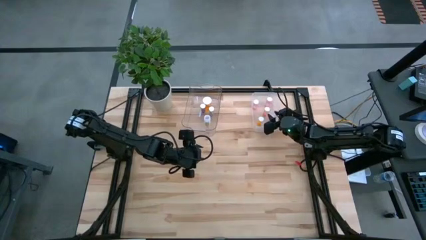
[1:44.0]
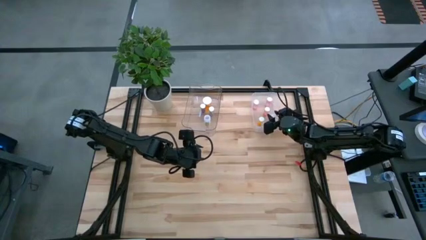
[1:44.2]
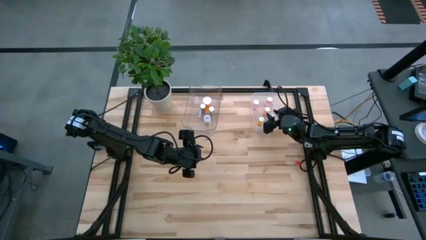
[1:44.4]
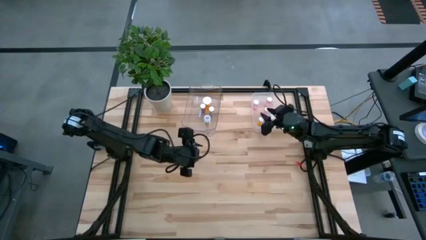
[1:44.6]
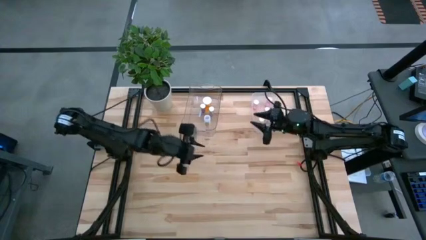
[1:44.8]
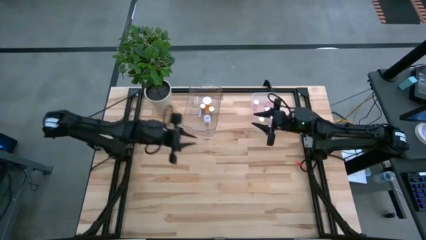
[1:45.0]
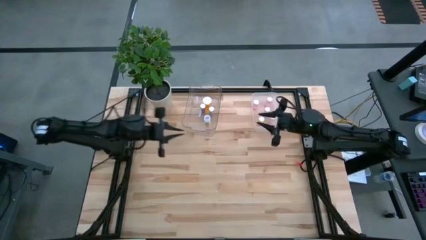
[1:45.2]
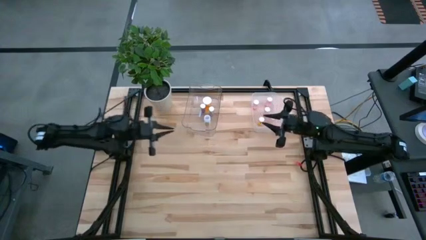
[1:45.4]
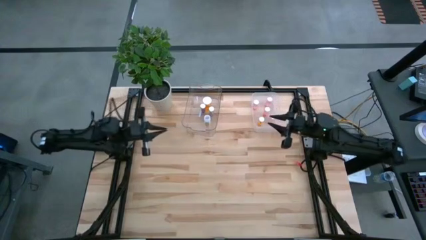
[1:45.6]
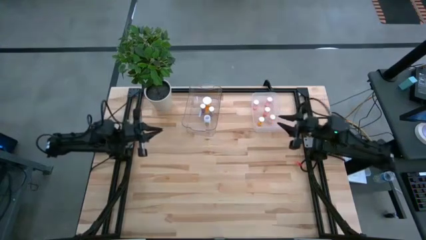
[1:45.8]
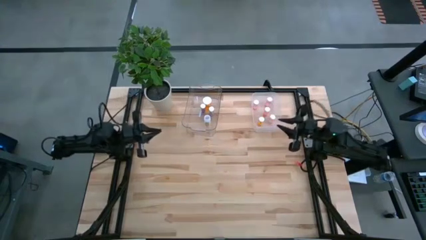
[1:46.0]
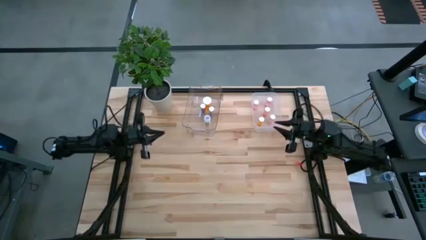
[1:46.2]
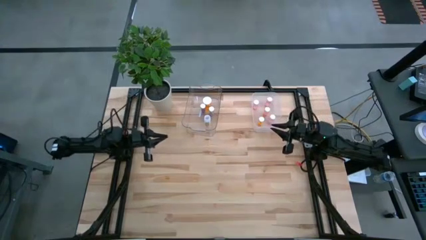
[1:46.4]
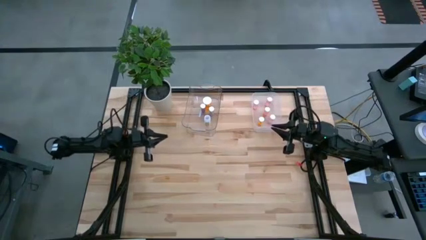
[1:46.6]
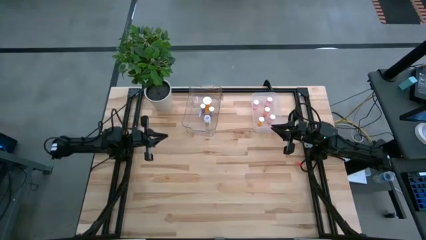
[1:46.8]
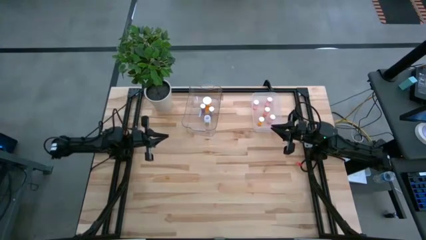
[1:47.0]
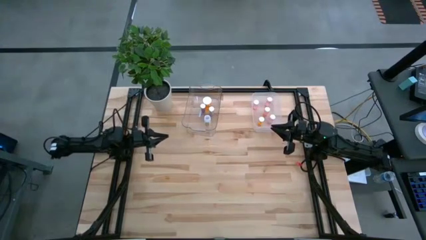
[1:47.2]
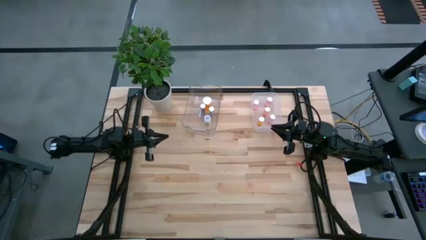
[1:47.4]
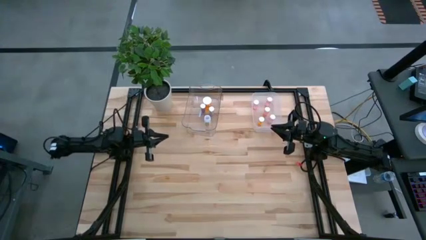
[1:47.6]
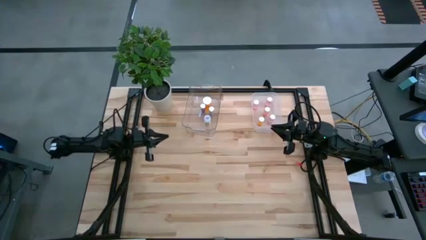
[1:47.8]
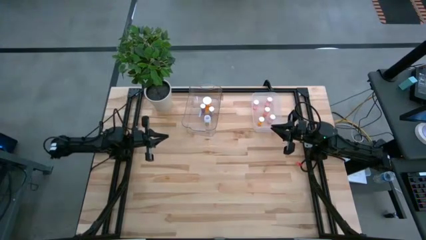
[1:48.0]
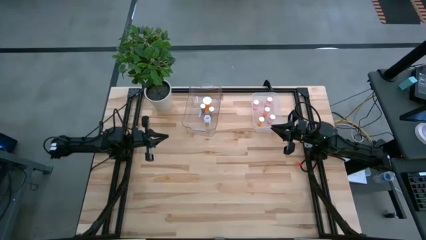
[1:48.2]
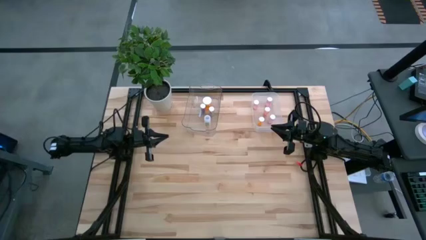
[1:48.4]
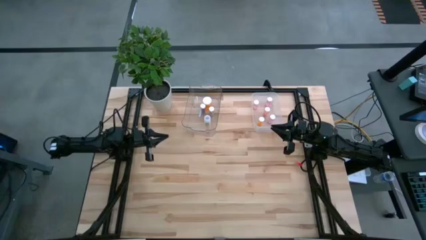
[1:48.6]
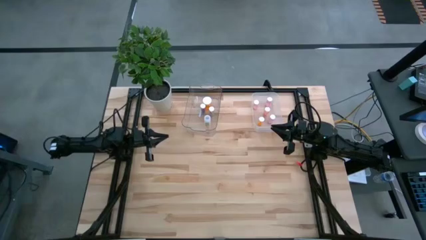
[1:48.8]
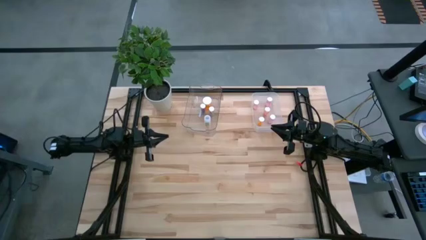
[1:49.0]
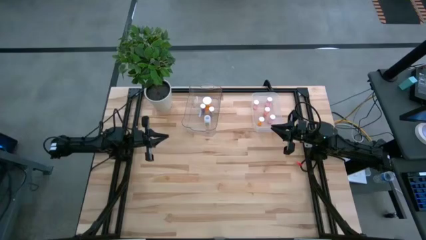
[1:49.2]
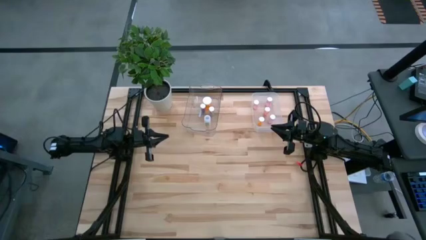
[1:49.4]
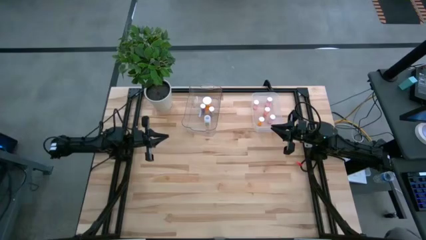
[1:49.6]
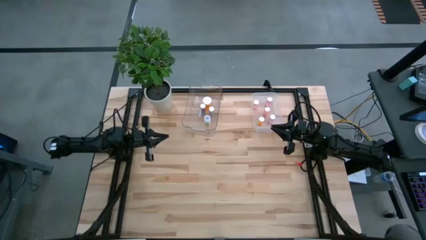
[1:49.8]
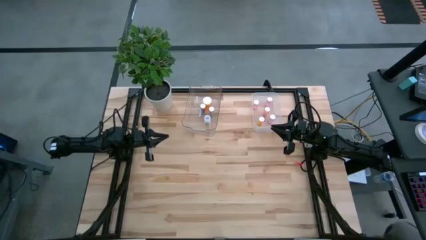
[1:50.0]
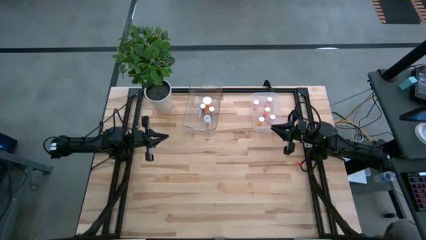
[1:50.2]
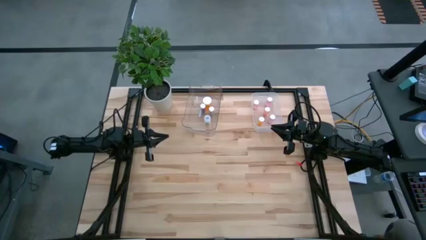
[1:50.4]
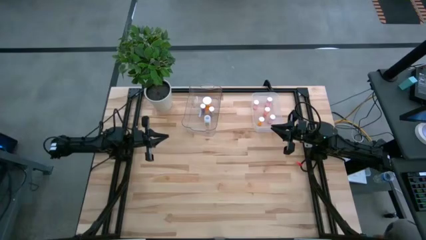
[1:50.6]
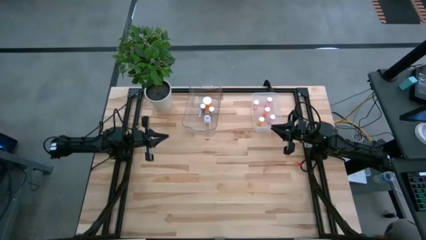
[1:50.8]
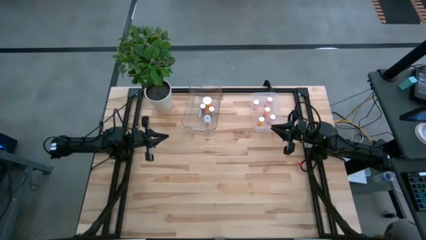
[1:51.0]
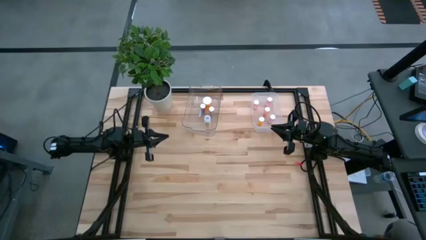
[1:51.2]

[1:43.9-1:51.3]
Task: Pick and place medicine bottles into bin by pill shape (circle, oval)
Return to Home Position

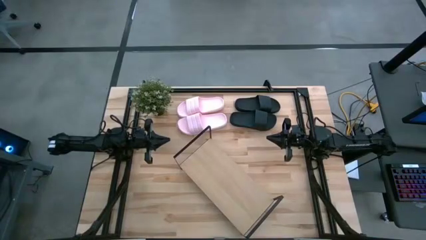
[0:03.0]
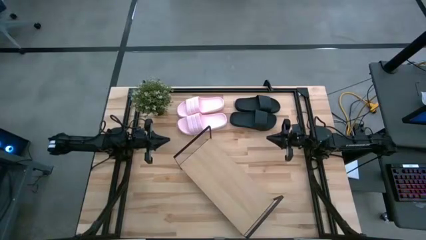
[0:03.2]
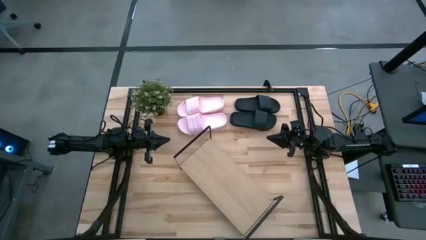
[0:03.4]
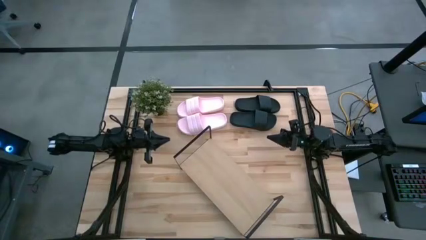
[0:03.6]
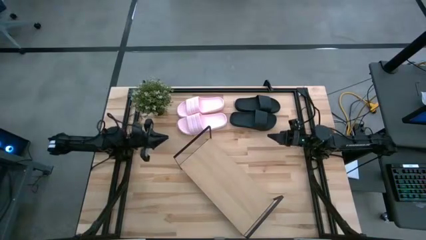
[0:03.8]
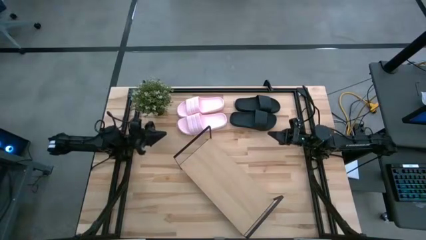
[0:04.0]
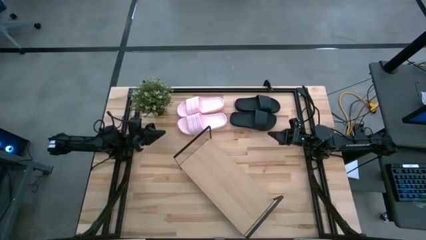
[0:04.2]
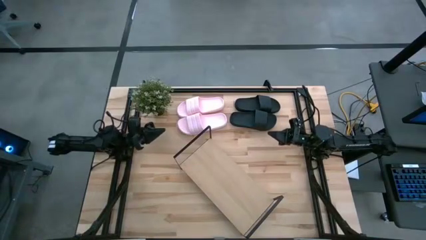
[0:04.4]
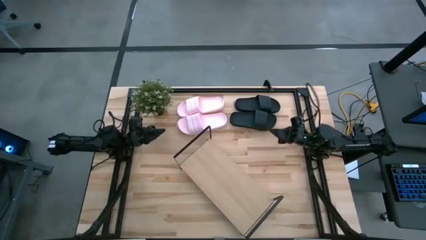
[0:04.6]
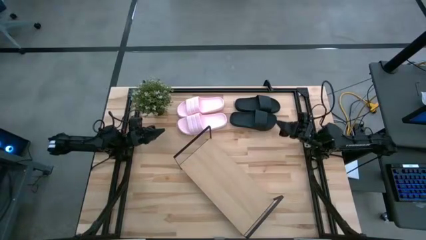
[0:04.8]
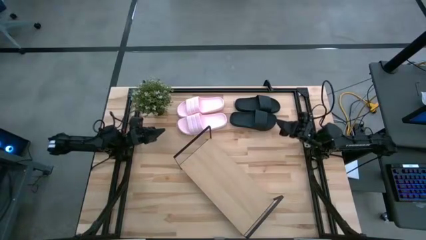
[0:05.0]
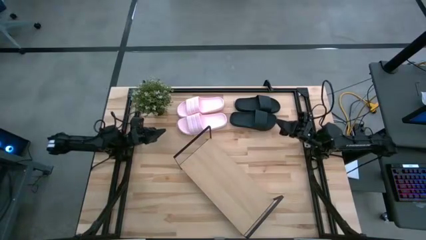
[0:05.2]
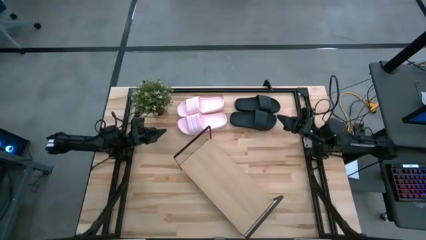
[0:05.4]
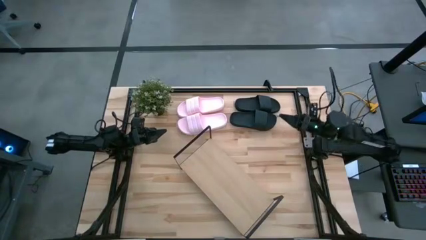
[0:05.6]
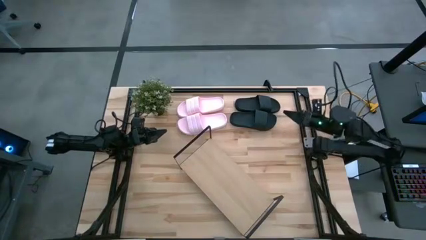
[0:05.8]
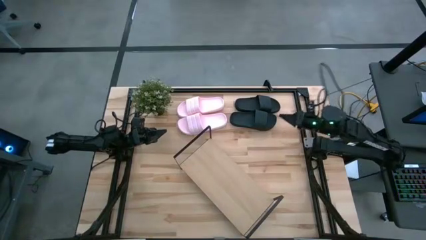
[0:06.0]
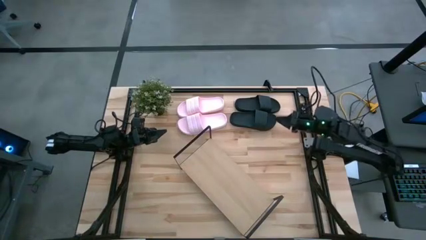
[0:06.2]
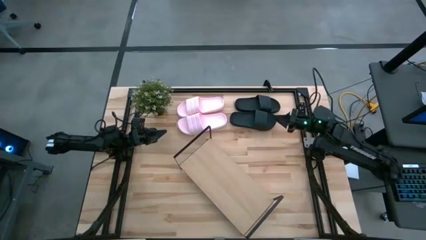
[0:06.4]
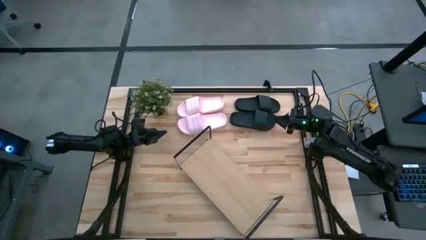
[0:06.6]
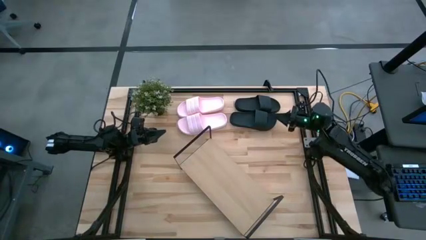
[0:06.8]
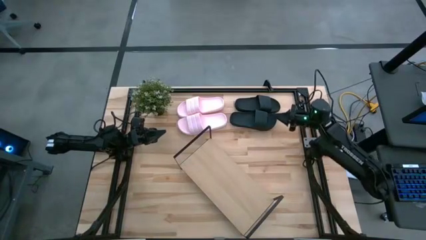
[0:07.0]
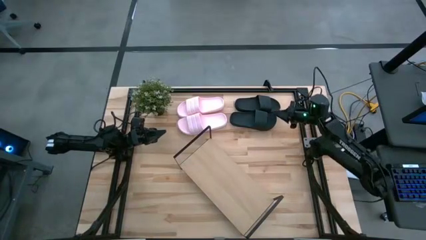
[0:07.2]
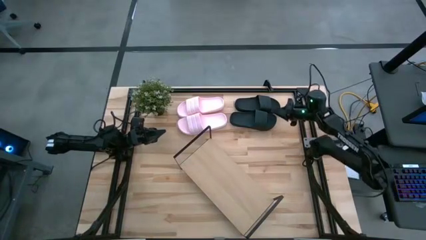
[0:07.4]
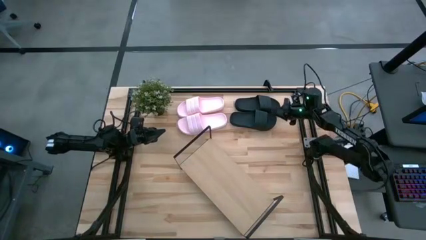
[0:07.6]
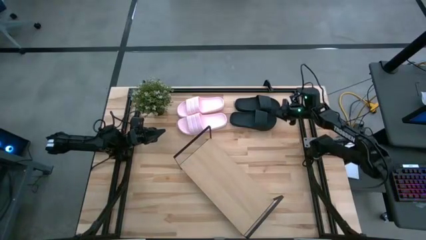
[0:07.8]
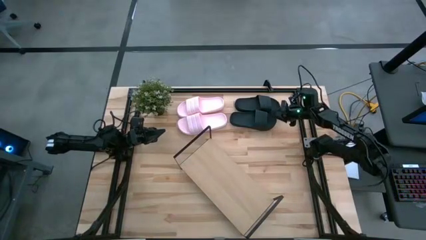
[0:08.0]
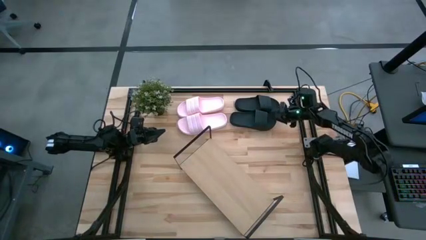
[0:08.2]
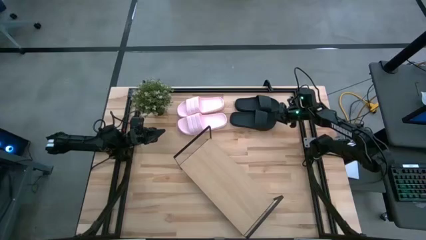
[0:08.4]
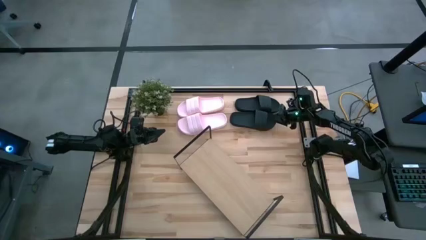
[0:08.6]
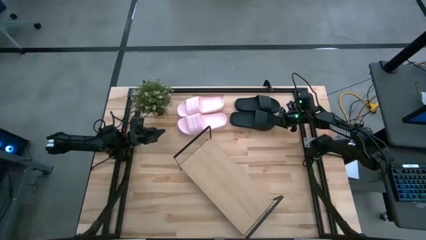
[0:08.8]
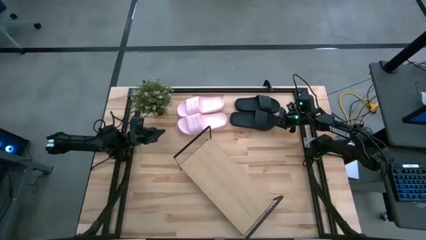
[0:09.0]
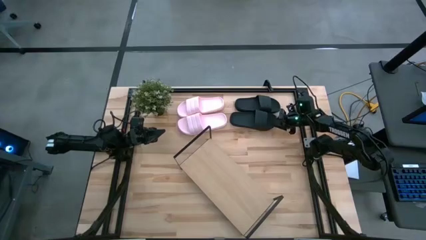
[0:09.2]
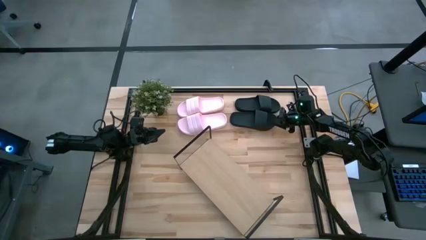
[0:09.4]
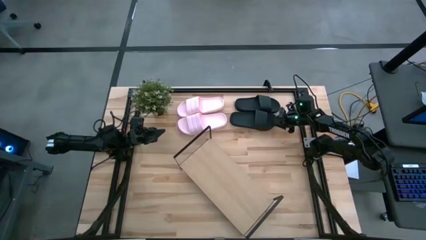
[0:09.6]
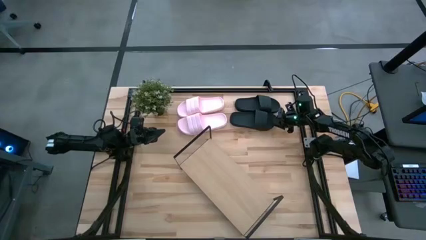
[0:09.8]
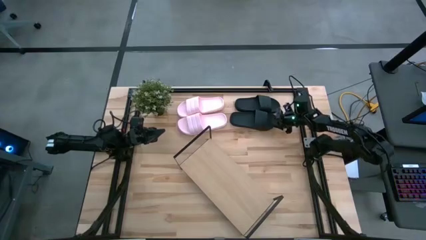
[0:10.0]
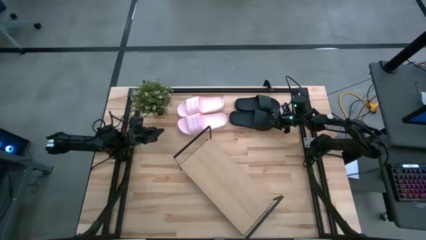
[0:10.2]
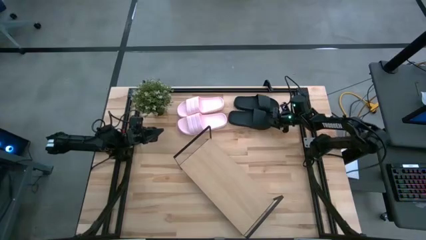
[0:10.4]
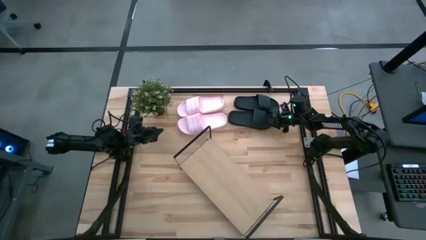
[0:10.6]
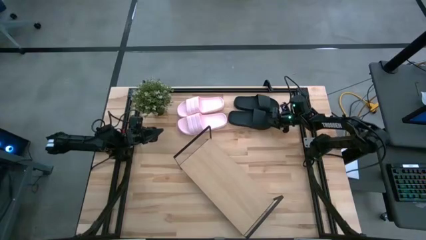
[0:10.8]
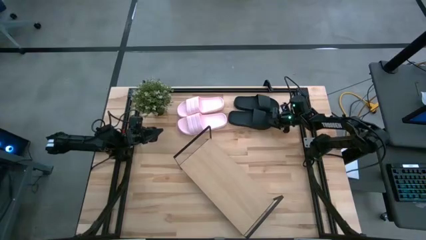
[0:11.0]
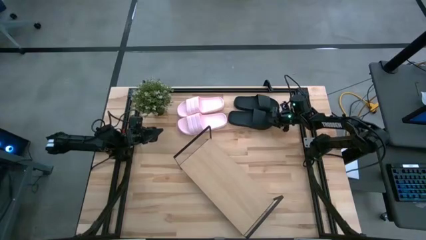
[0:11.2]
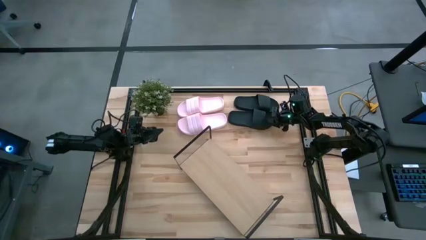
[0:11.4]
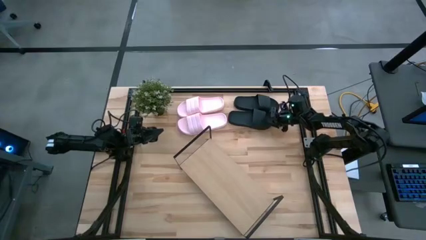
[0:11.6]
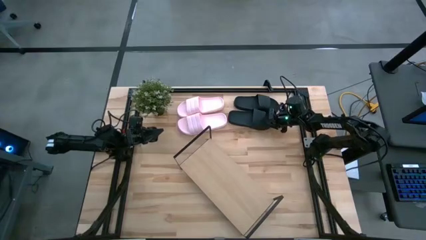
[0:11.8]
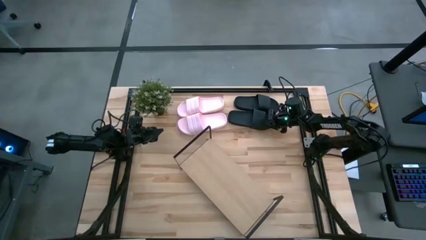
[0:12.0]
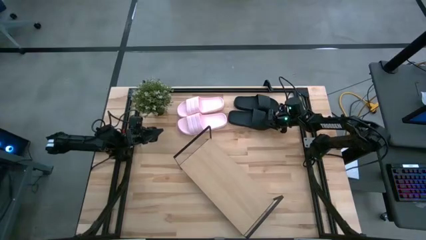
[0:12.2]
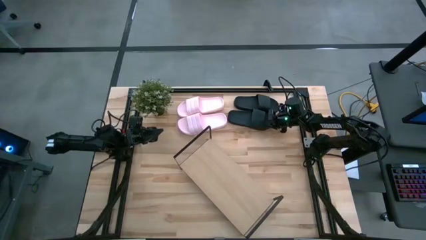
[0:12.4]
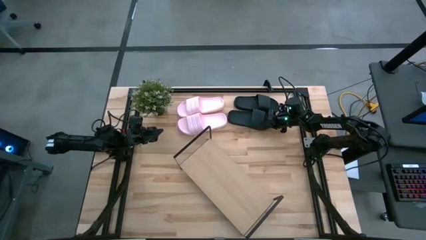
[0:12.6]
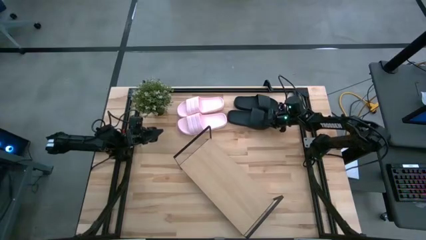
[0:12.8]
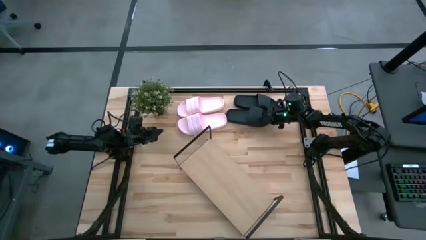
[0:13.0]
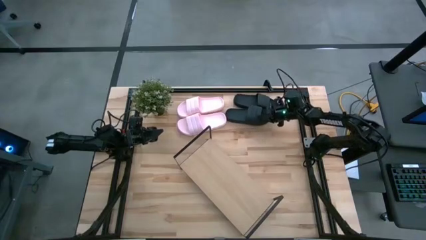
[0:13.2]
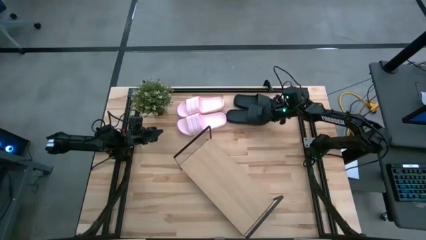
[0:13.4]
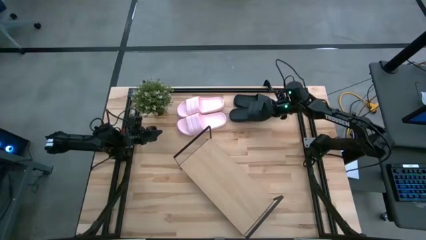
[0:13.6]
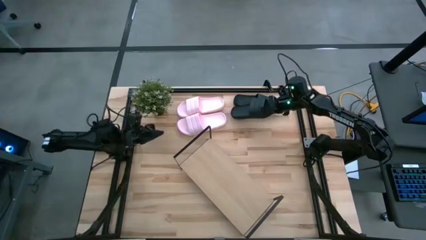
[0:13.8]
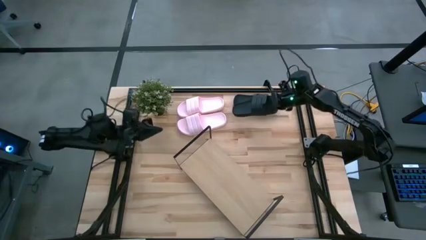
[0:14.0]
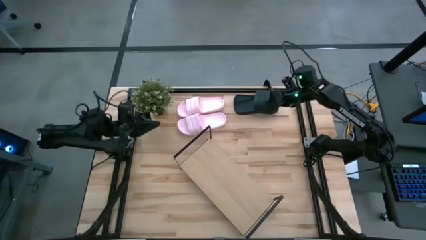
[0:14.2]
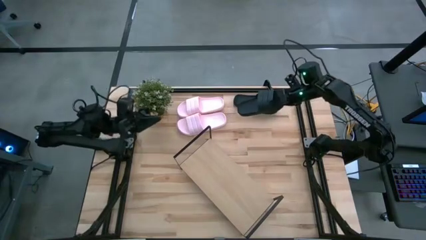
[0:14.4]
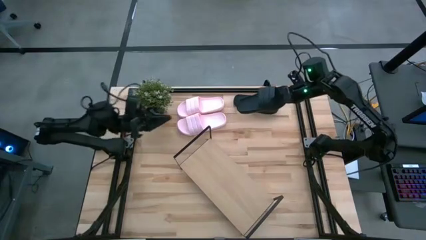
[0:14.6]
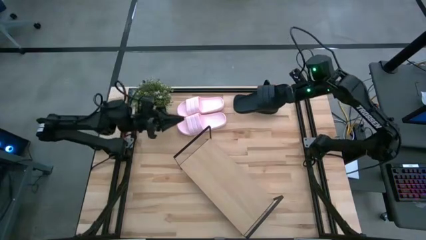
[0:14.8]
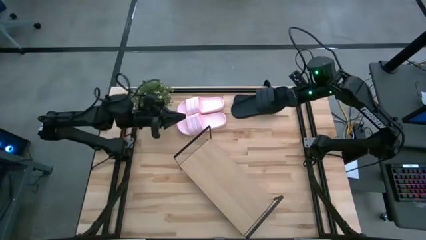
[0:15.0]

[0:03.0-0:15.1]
Task: Pick and place slides into the shelf
Put the bottom black slipper on the shelf
